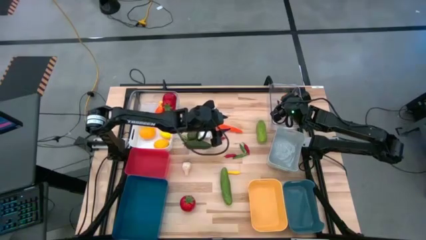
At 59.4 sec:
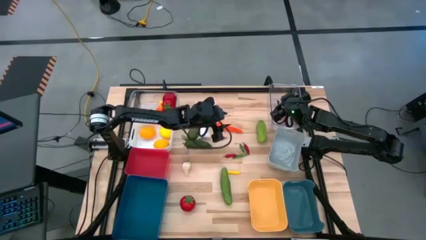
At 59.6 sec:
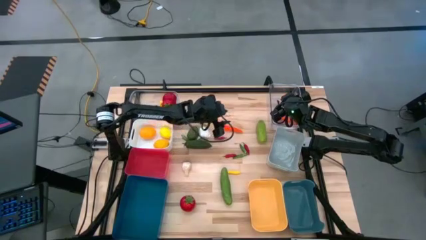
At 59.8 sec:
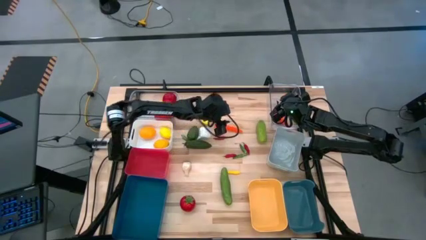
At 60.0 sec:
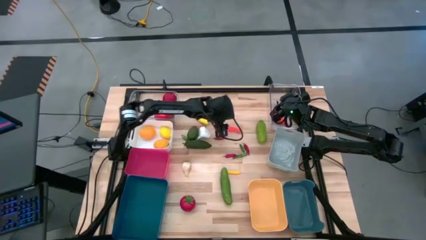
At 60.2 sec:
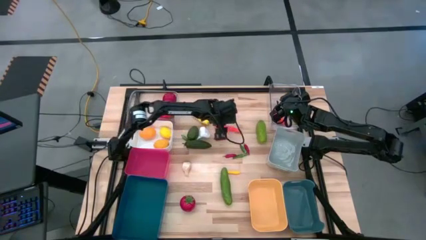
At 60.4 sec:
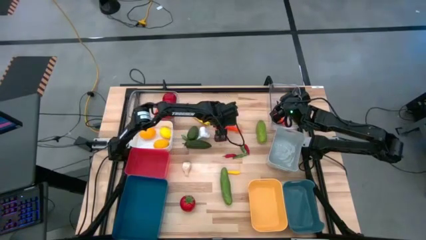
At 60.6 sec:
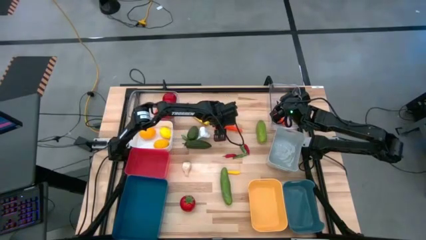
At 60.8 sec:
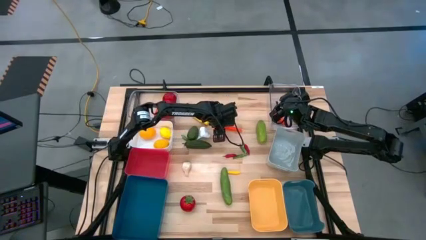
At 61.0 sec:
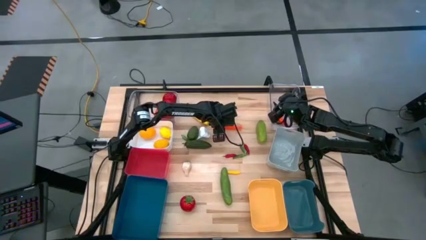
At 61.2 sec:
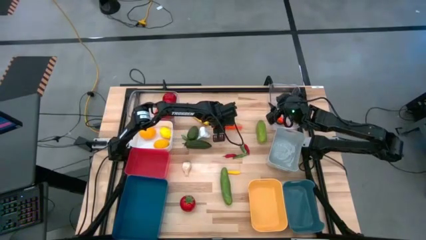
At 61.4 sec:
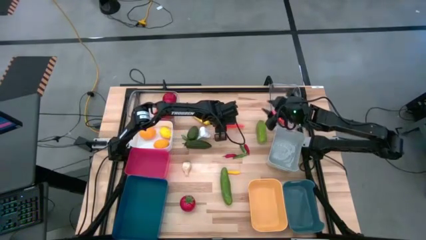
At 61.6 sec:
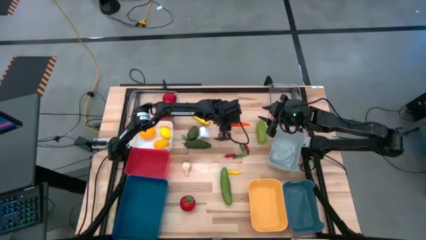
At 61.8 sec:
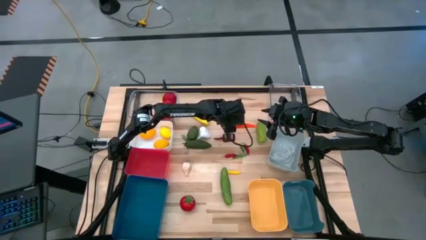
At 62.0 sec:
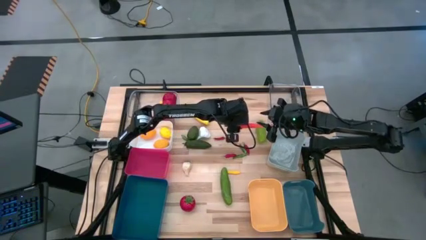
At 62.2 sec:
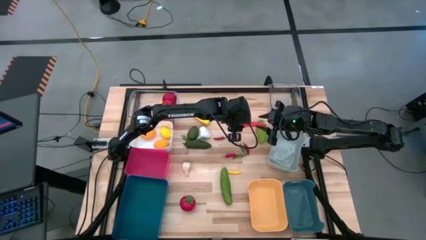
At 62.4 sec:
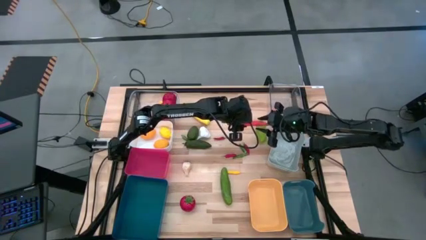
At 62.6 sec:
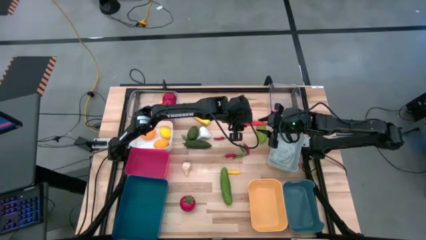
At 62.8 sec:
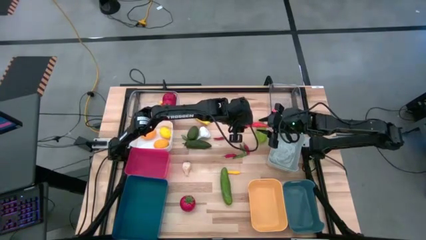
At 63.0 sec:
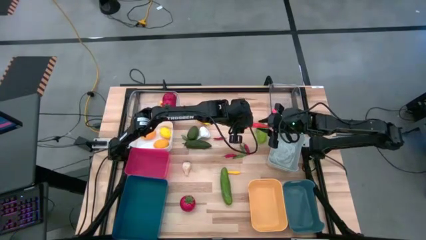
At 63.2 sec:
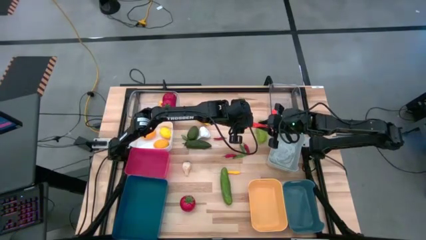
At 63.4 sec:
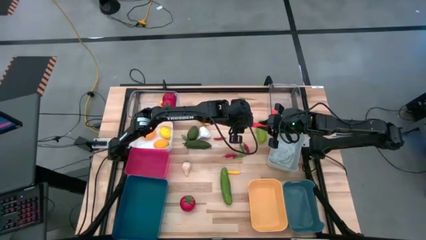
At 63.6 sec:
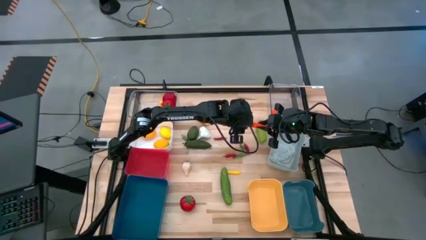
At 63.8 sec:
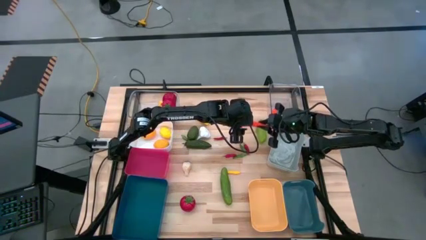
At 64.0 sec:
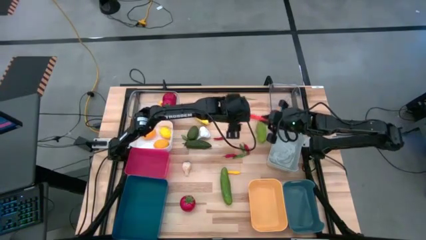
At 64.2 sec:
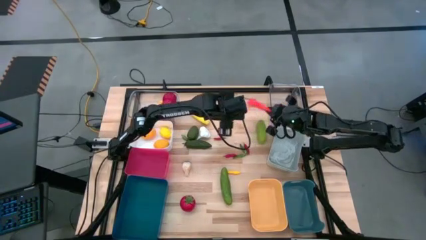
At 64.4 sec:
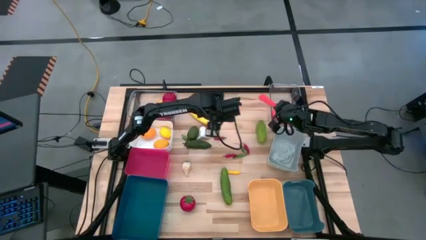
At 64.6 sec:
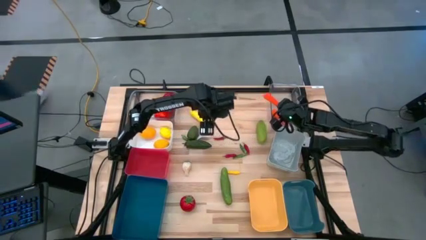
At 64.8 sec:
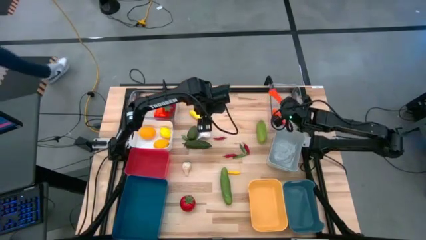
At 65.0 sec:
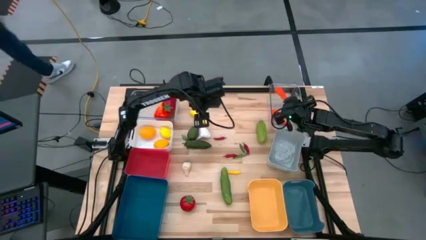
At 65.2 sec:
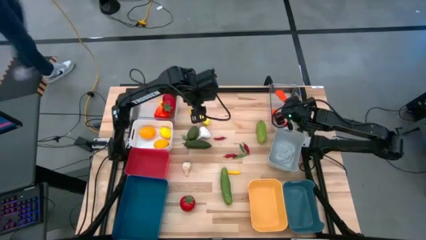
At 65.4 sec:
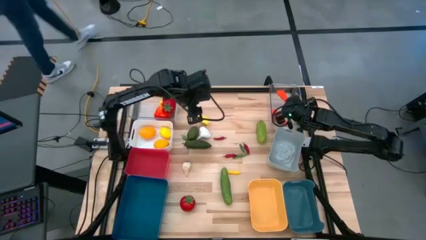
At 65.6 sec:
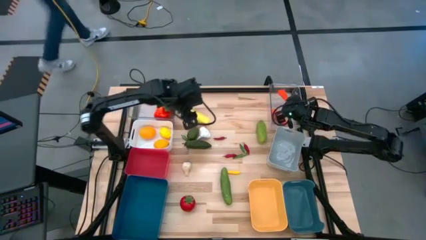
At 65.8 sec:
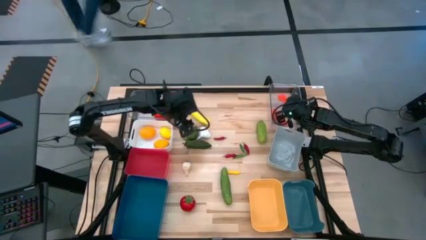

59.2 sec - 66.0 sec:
Task: Sort produce into baskets
Put the orange carrot into the right transparent bin

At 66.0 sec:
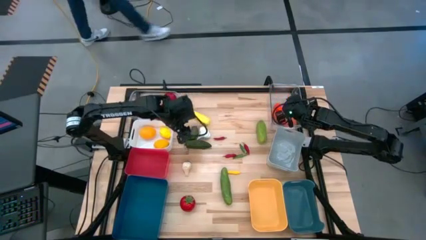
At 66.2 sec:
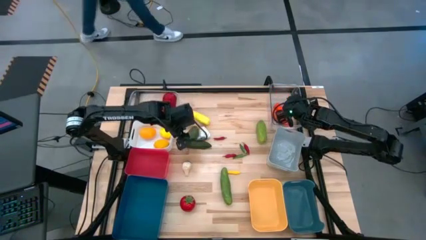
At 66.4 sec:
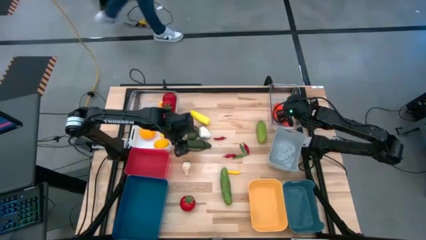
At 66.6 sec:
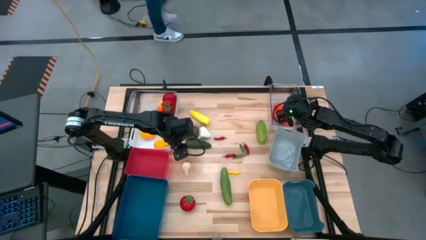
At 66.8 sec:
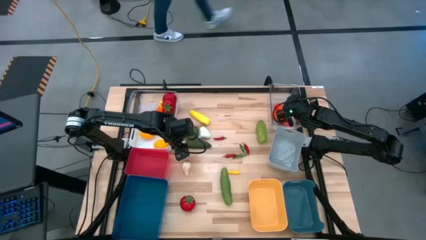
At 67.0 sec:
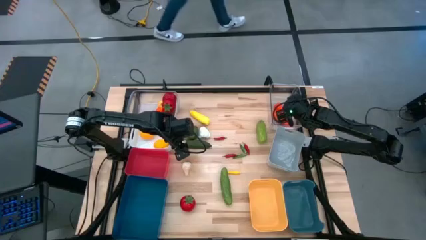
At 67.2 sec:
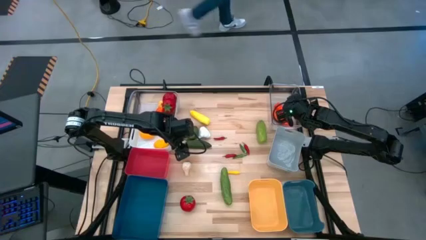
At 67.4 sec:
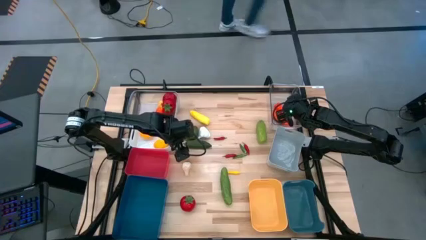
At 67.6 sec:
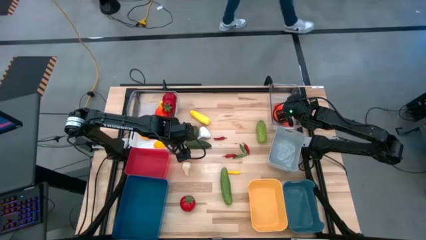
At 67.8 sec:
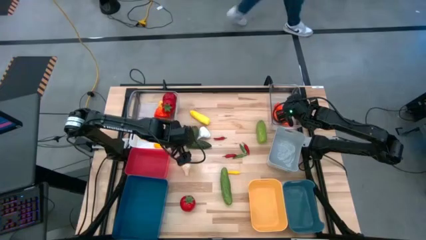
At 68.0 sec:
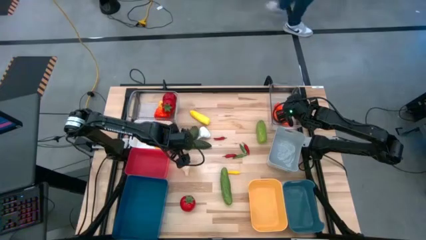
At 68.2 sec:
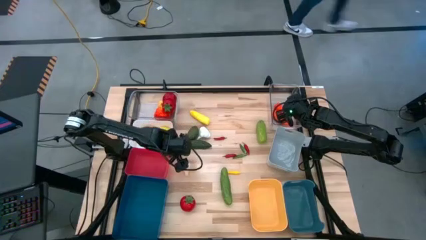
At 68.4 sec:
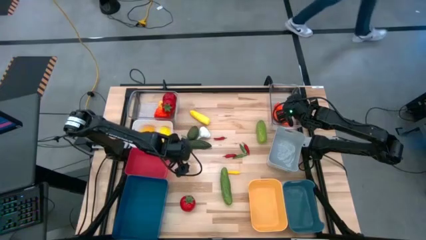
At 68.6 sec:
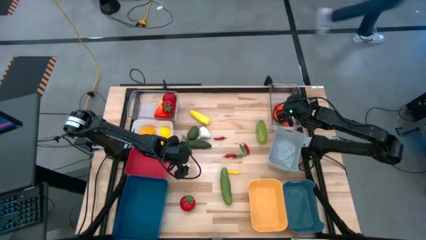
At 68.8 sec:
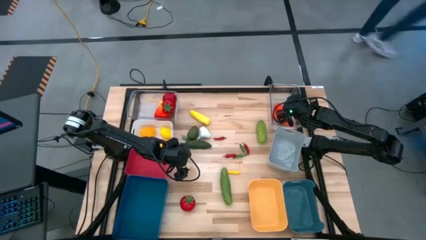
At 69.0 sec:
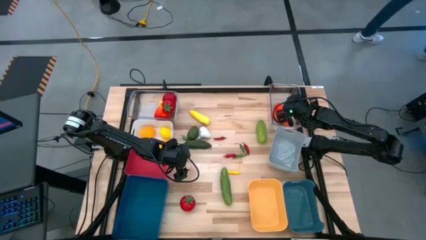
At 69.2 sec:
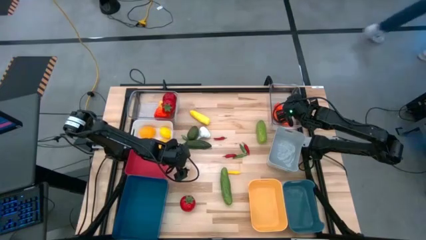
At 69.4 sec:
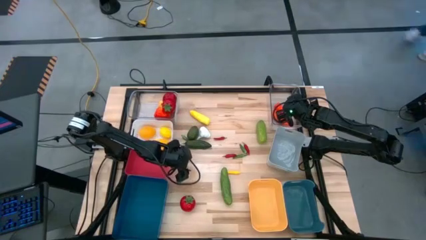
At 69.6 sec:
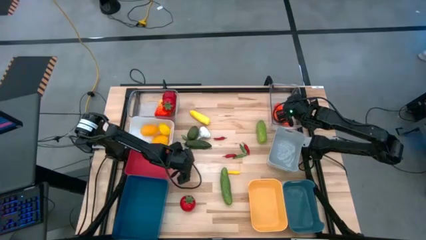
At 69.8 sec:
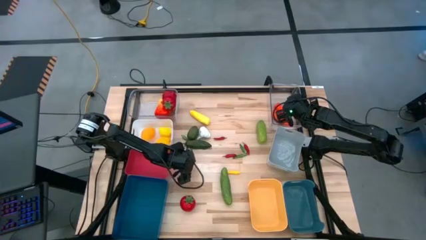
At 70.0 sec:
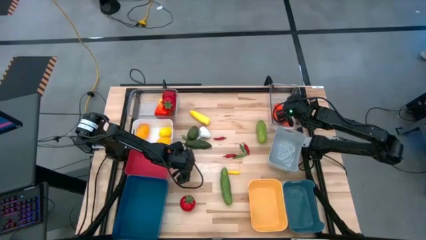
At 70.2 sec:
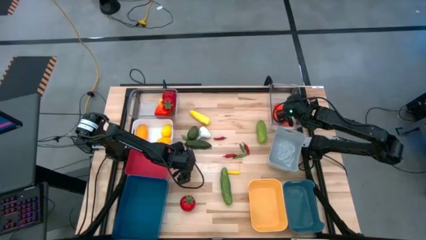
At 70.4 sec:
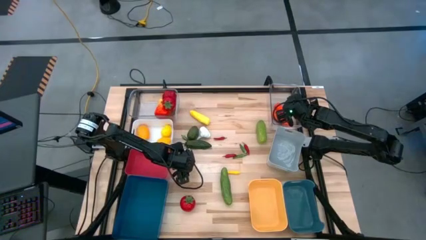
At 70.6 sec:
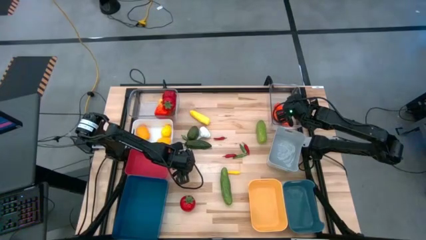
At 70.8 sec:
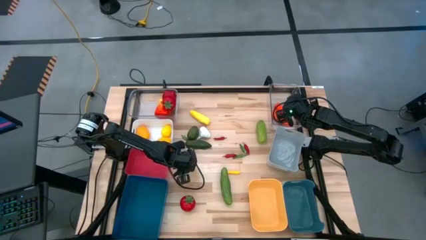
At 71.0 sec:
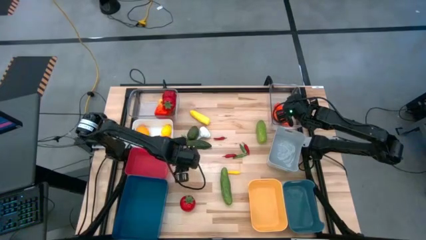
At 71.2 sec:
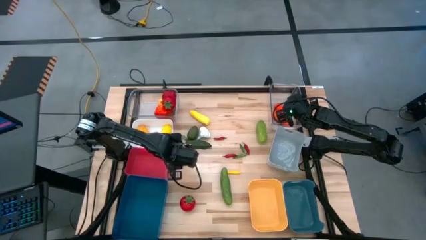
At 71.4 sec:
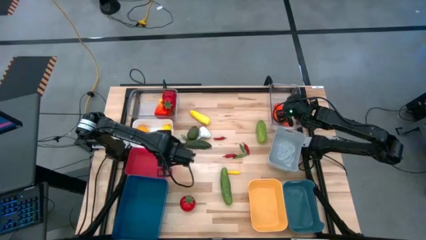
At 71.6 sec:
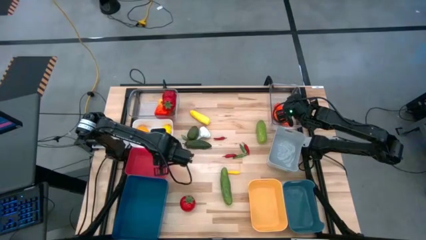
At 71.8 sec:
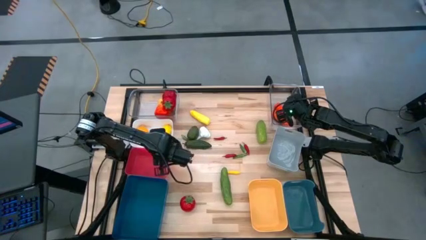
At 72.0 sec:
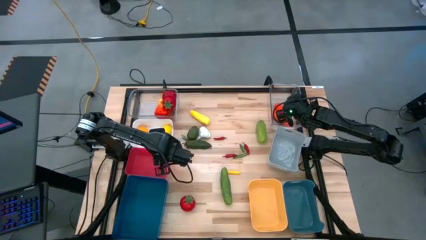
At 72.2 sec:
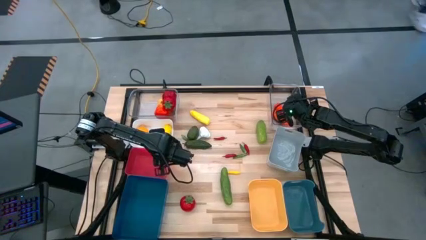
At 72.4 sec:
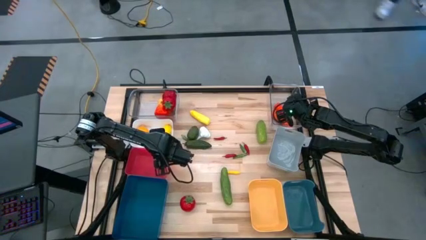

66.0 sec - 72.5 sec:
Put the bottom white garlic into the red bin

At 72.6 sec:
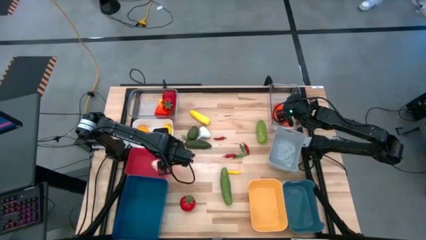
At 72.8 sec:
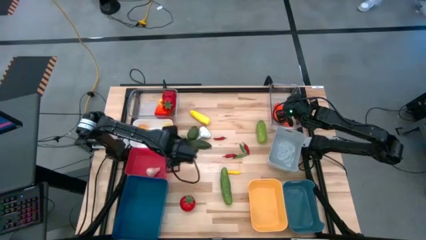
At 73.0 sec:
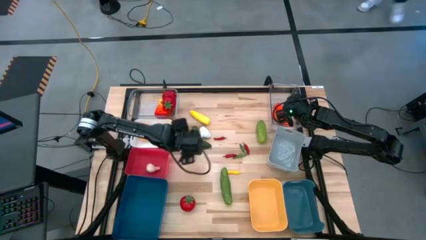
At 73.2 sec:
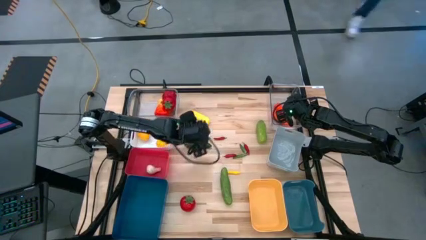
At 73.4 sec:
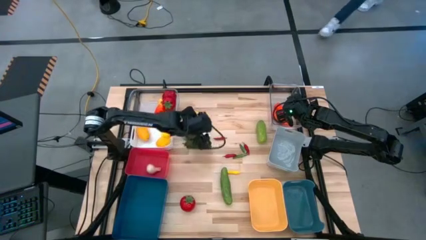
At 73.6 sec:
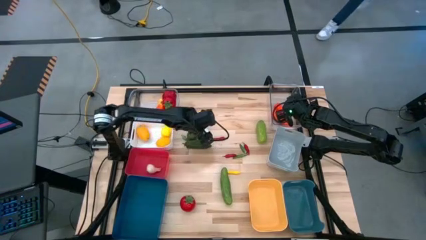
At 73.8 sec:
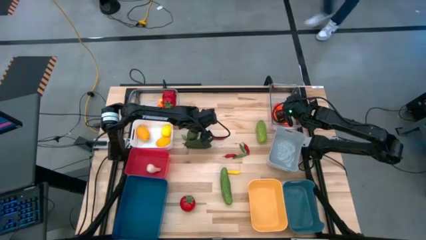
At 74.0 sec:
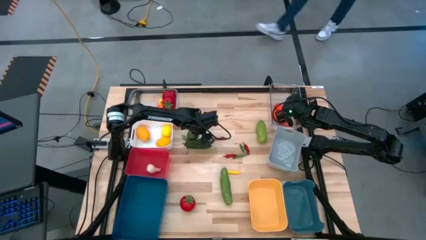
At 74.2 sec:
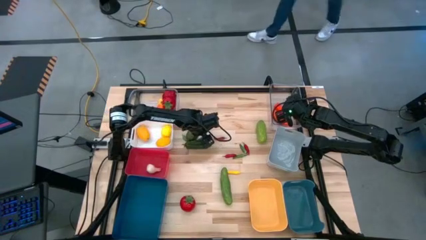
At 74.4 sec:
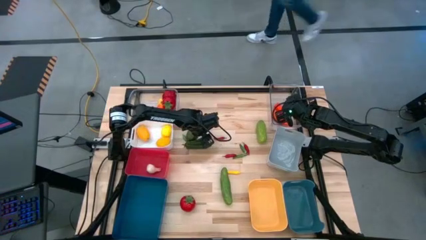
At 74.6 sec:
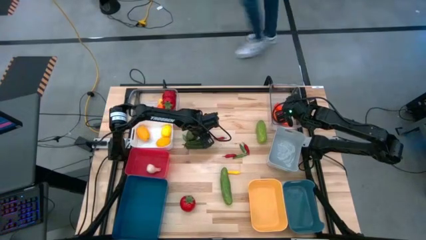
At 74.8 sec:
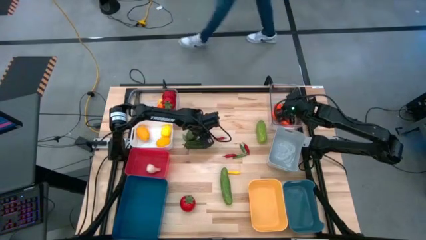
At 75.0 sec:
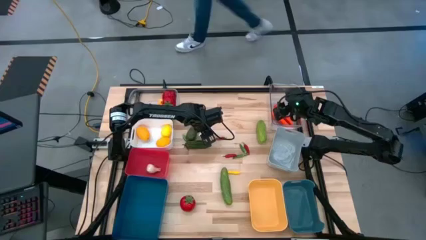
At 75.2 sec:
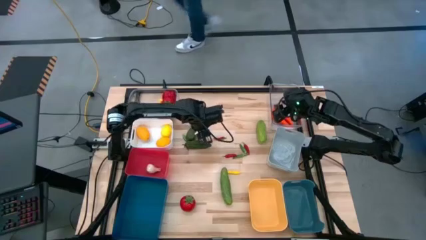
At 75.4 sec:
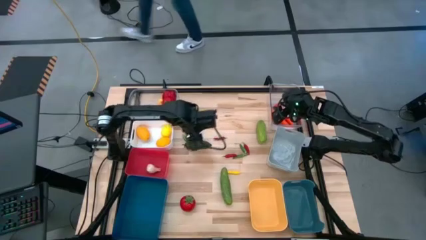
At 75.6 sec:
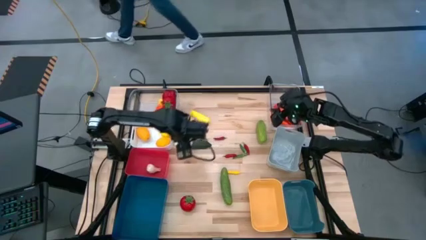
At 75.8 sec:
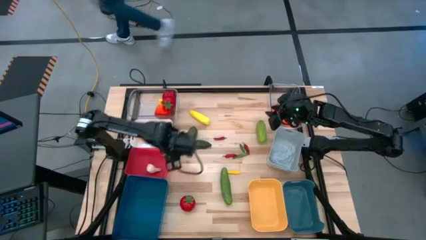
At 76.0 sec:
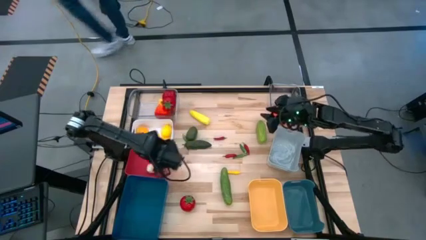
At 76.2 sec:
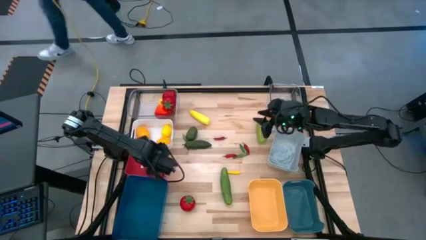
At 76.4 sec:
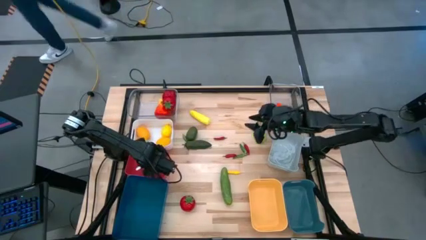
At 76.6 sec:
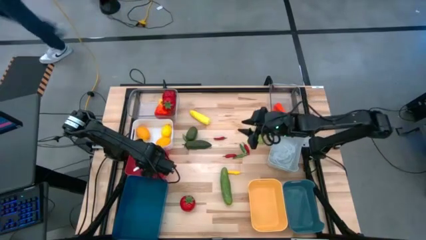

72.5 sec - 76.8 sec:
Put the white garlic into the red bin
